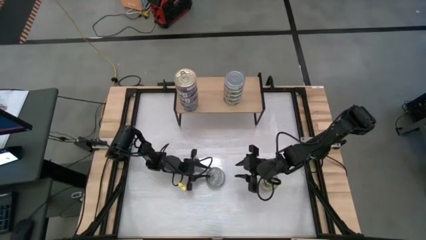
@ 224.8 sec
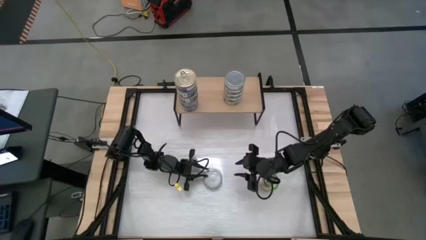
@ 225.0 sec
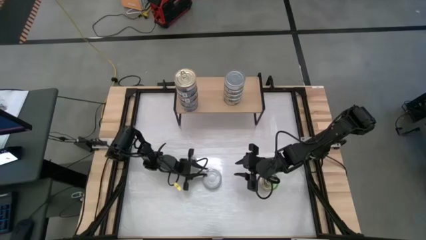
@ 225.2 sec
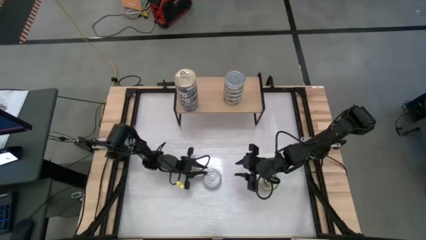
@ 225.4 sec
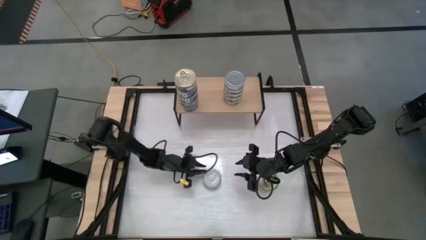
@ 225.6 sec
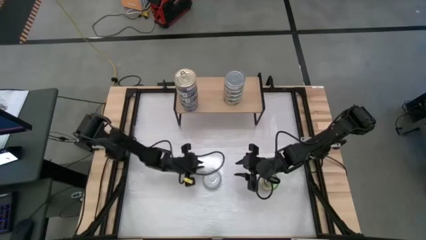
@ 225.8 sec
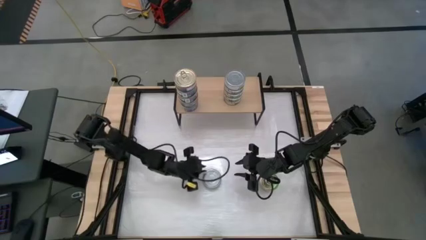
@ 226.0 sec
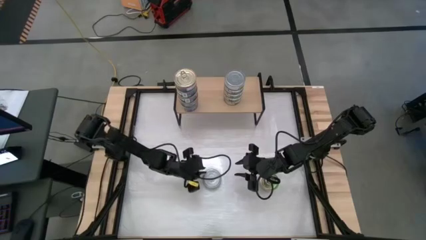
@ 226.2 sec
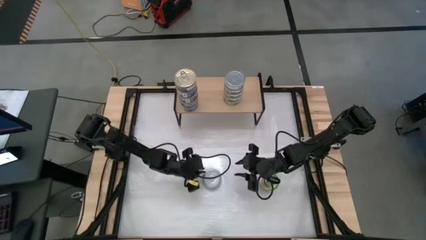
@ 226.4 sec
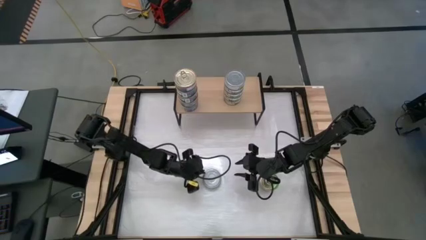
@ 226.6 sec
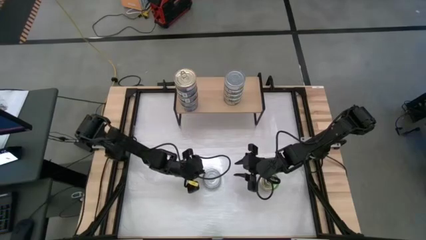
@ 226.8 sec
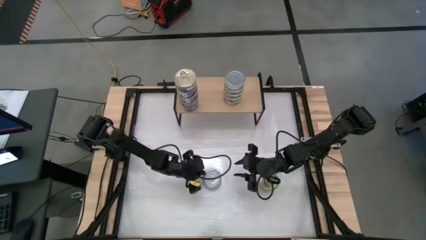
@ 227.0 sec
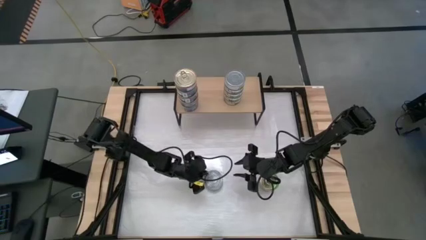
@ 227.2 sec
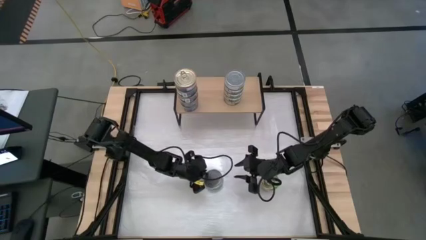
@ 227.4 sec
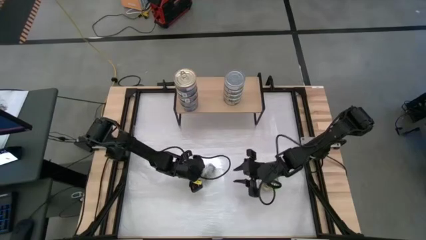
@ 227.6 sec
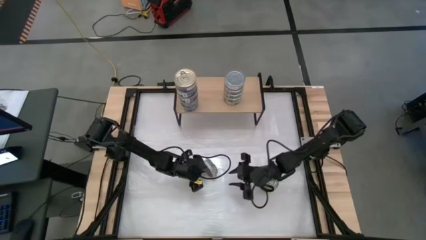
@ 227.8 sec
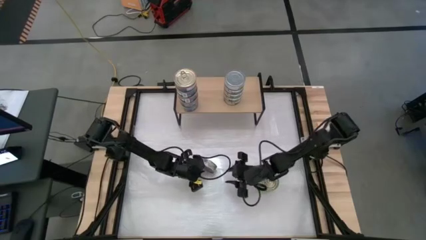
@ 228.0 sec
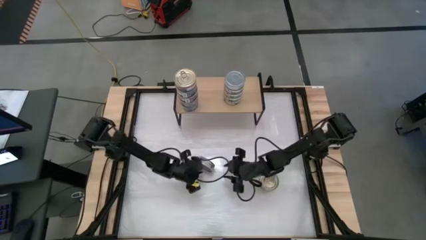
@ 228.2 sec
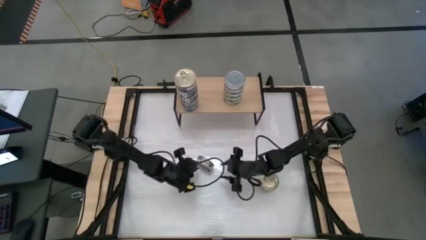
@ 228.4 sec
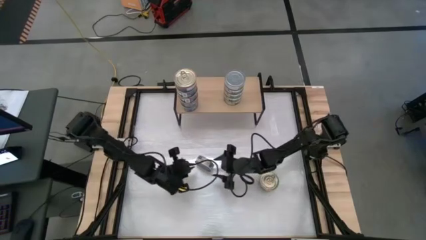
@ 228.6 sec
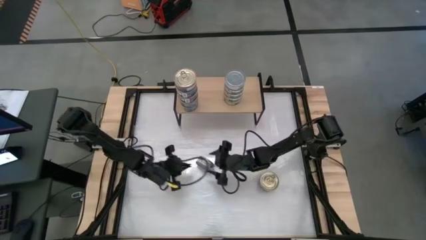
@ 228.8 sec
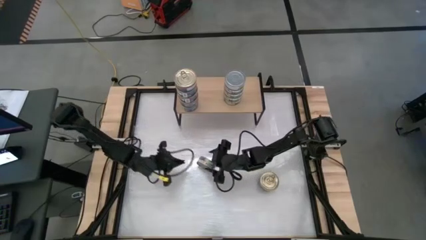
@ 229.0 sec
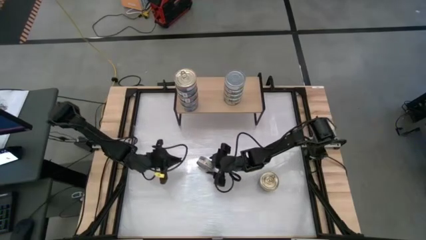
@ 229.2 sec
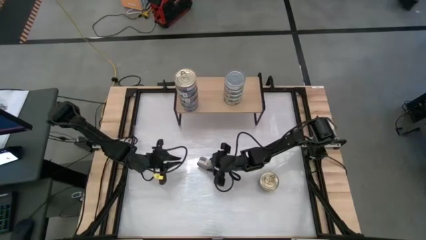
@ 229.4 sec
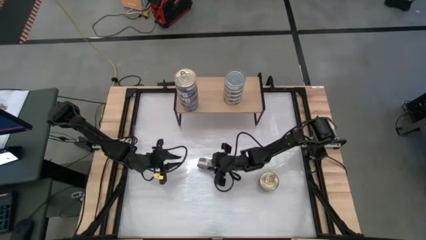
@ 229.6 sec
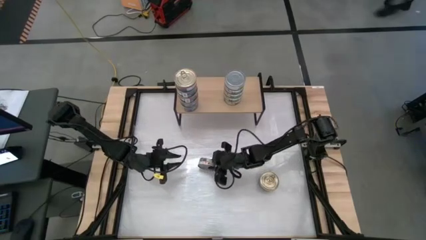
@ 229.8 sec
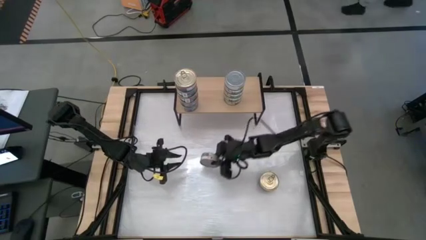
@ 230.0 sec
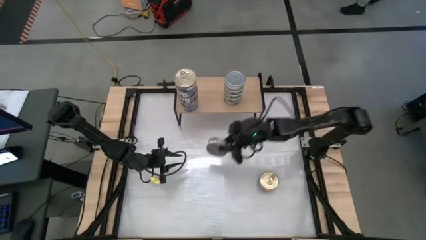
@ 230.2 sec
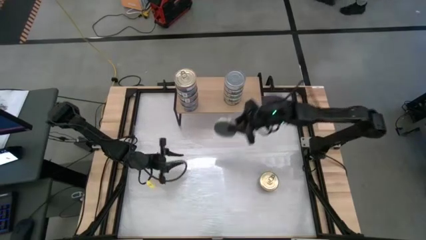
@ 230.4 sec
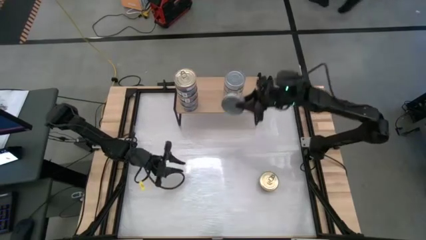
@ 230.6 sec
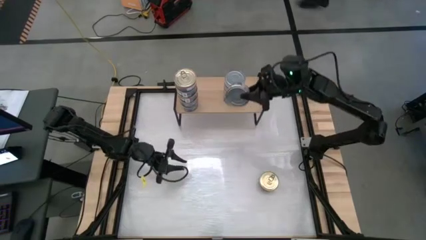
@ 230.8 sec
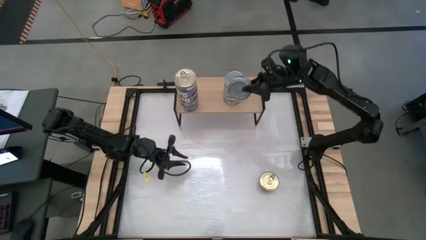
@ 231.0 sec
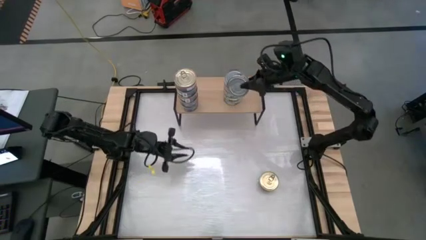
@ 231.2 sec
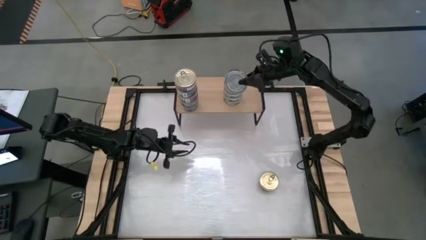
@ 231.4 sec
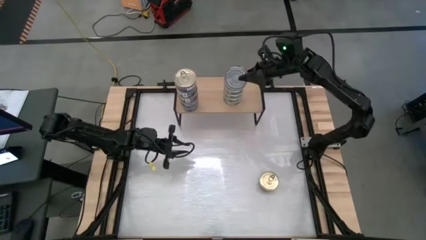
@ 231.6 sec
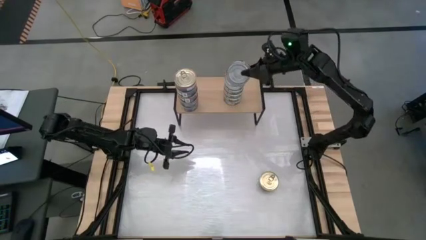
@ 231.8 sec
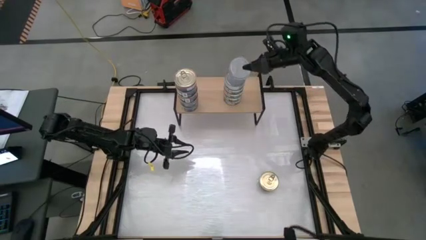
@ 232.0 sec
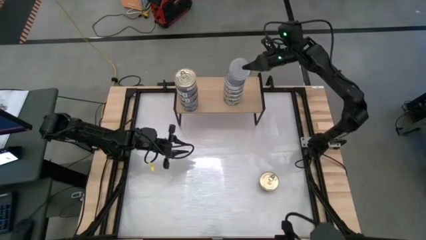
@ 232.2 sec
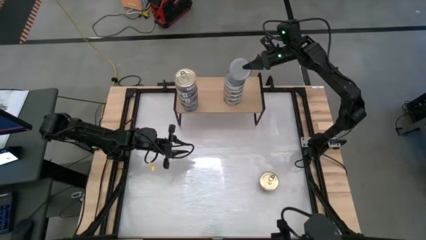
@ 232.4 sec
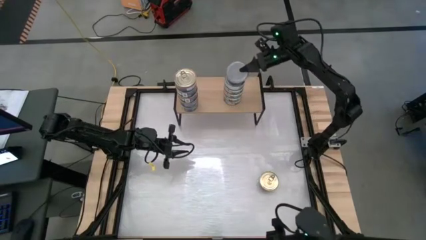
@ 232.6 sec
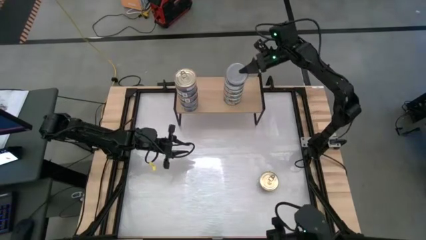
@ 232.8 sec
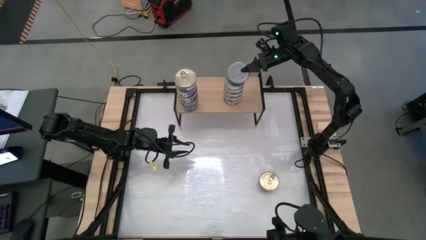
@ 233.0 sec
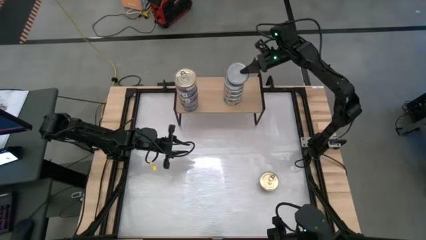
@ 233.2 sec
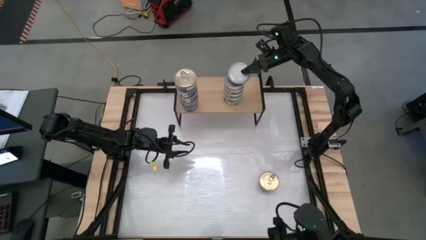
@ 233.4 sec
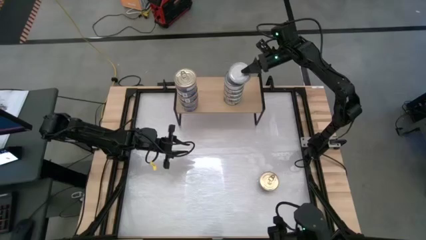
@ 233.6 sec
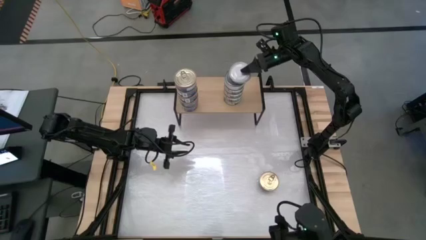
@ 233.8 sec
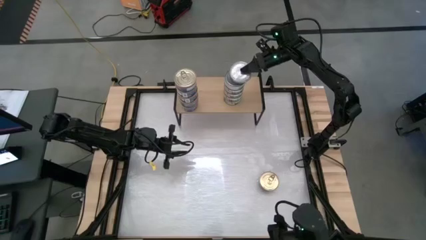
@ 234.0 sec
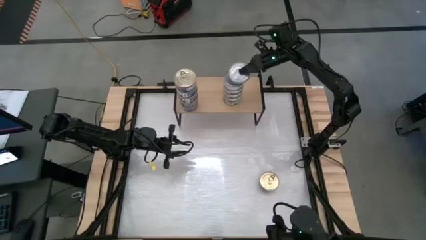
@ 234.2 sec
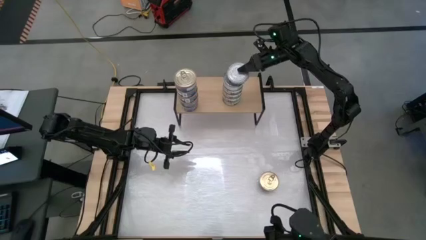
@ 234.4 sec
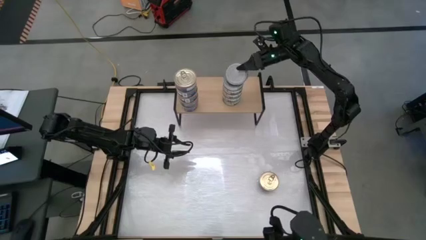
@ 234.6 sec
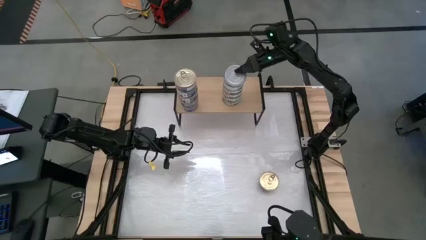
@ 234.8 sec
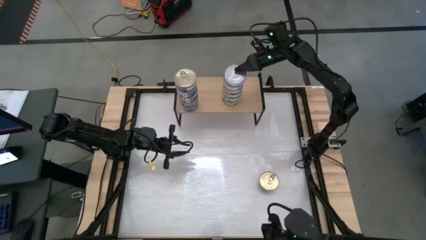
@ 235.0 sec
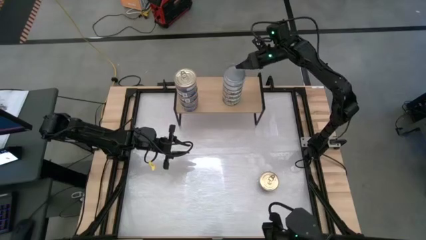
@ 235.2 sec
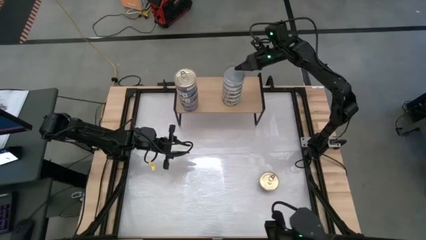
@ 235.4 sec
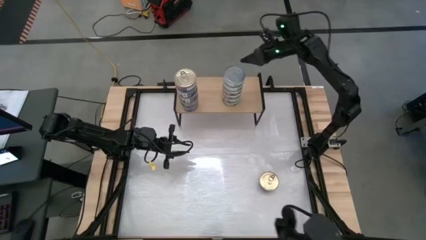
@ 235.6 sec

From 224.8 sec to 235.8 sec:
Task: Stack canned seafood by type on shelf
Stack the green tuna can on top of the other green tuna cans on the shelf

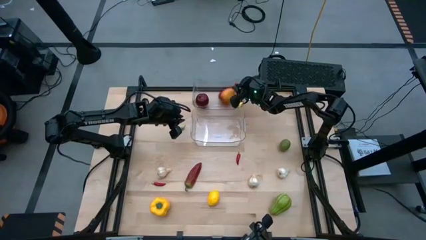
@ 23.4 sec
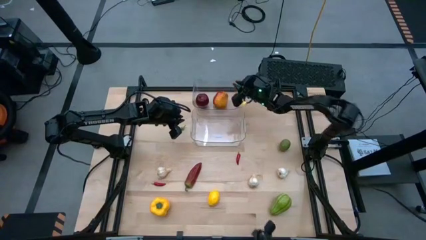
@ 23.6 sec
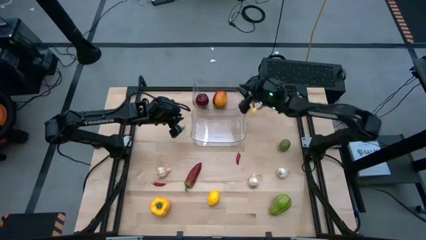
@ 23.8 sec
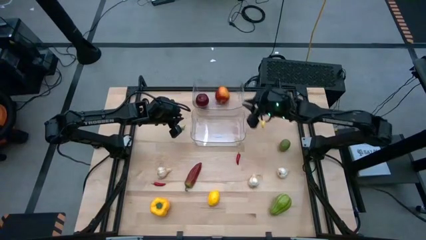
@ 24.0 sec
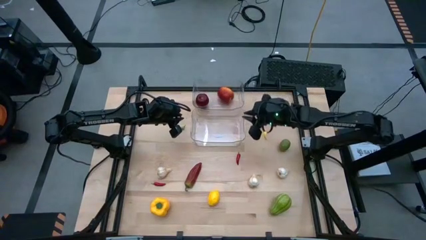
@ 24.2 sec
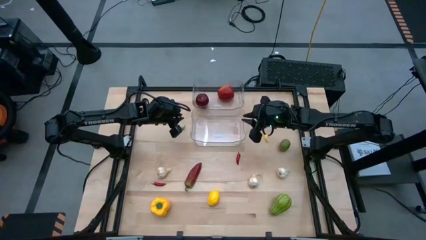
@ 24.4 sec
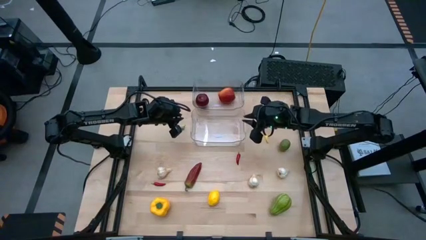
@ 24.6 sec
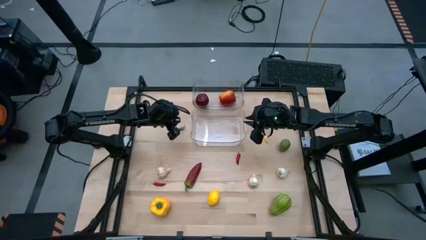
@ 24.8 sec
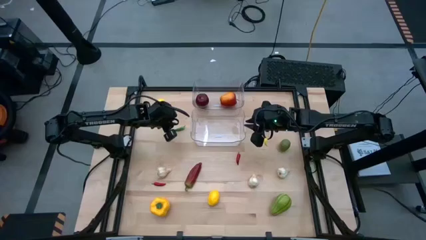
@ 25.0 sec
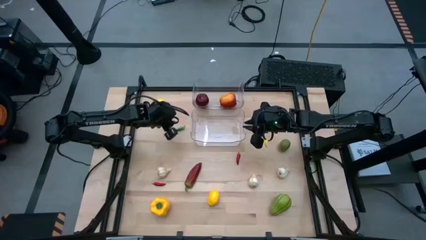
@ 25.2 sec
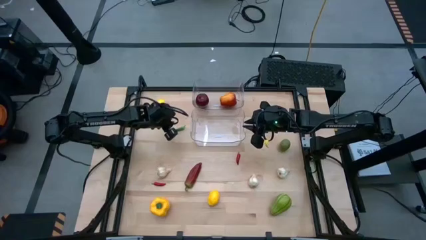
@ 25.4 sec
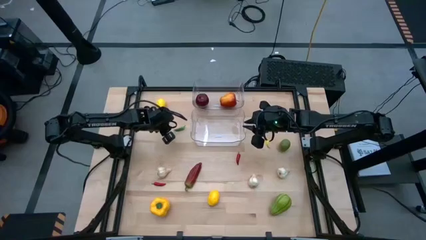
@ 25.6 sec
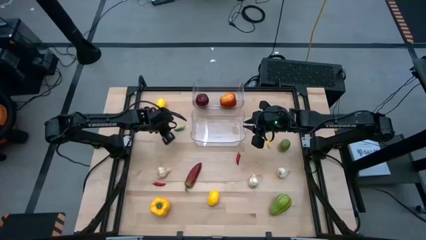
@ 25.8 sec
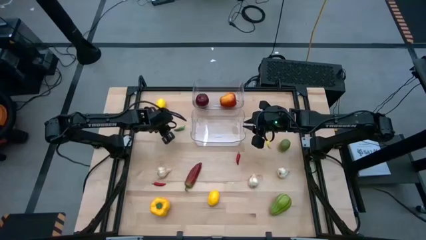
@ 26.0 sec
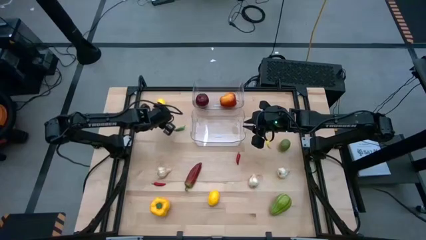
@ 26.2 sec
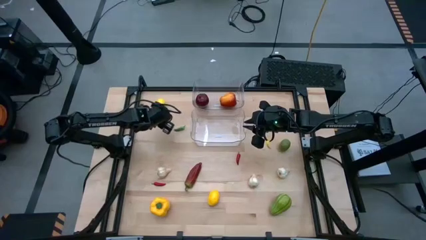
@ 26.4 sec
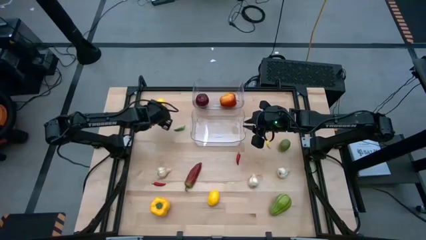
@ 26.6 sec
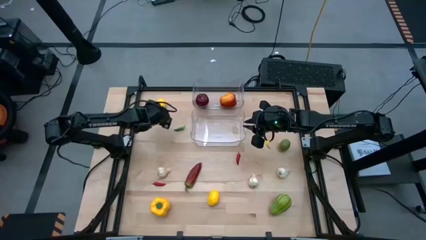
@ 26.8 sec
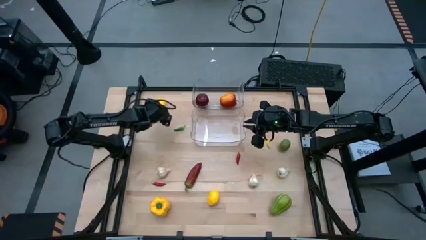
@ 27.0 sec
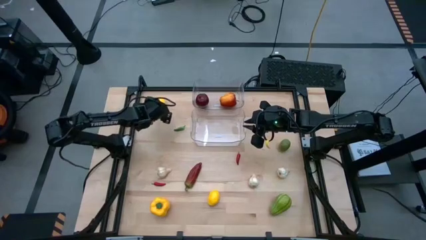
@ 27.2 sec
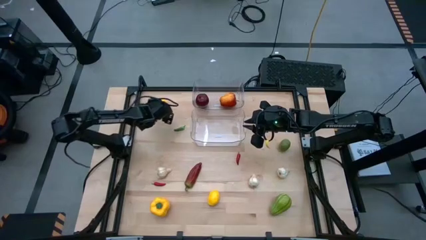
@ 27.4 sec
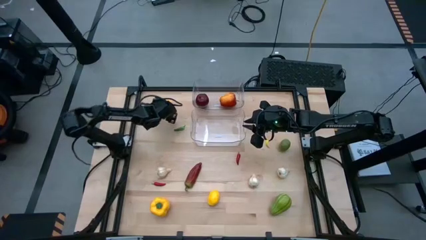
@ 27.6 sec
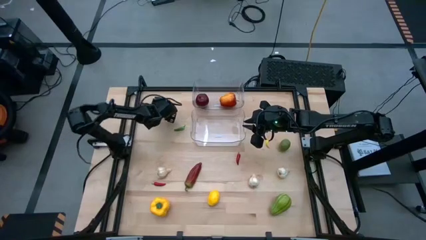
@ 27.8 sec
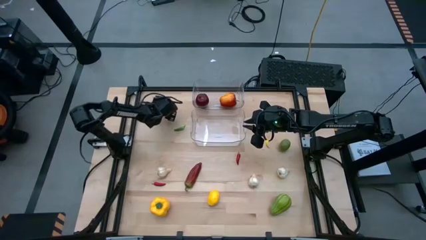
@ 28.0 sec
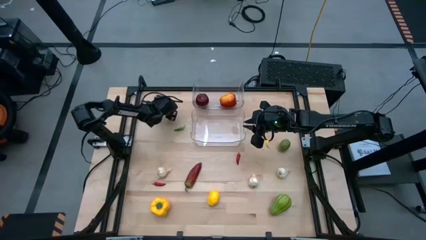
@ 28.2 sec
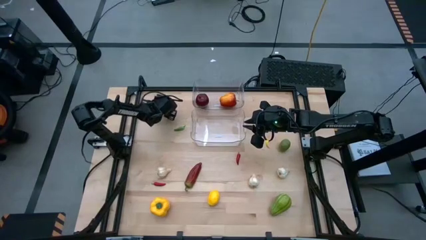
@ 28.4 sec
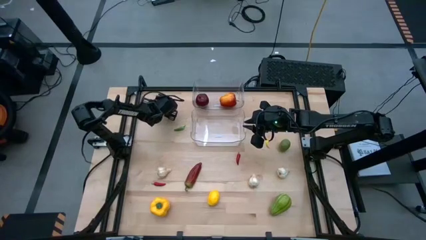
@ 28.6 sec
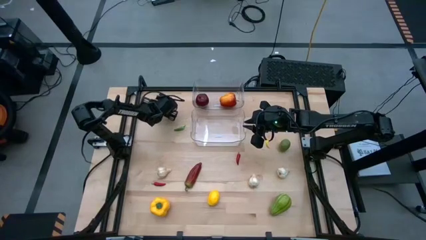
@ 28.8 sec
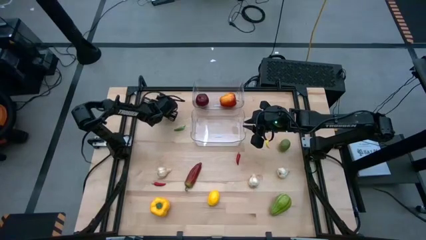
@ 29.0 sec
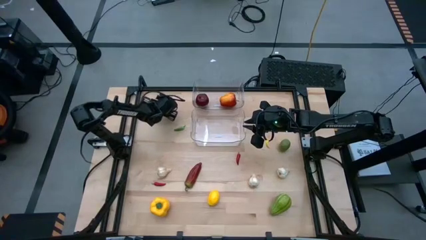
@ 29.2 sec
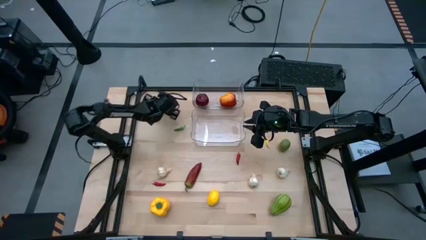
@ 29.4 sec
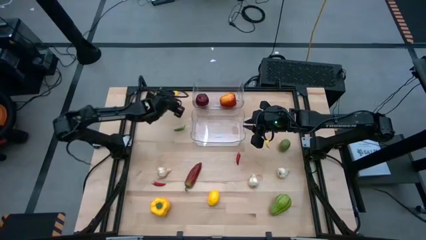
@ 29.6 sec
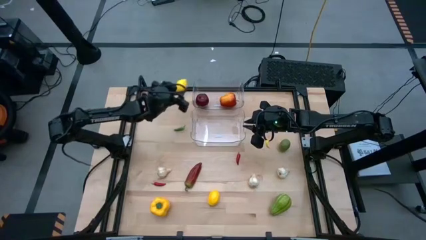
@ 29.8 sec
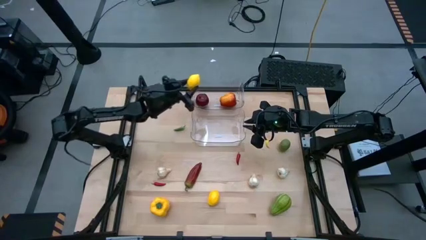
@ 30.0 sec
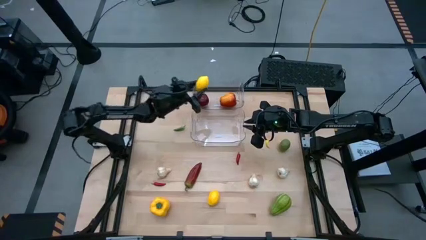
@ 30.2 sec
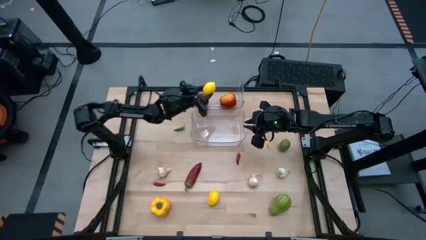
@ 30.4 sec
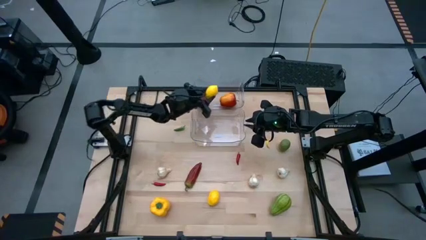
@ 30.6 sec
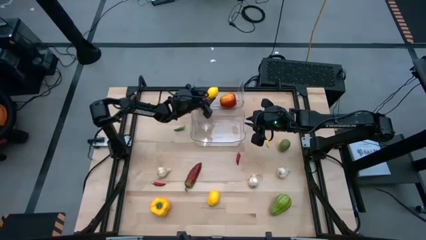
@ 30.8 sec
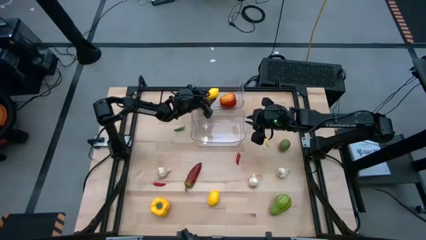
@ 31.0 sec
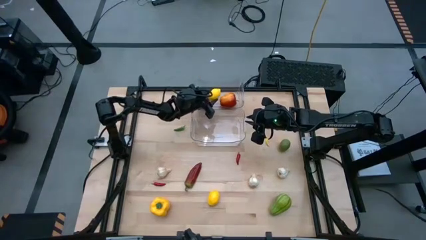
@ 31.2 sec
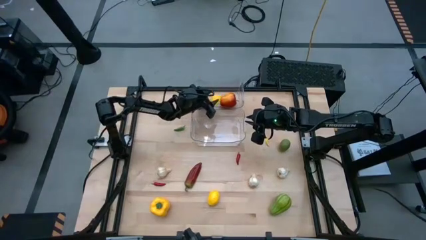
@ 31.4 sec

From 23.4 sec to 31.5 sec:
Task: Sort produce into baskets
Put the top lemon into the top transparent bin
